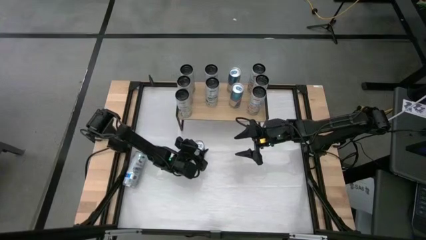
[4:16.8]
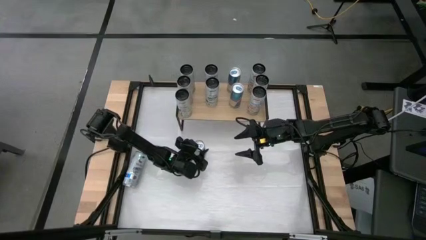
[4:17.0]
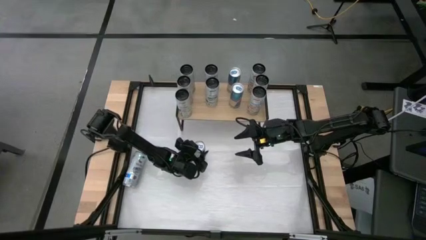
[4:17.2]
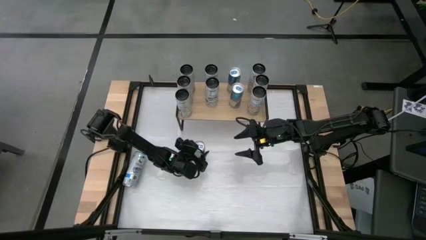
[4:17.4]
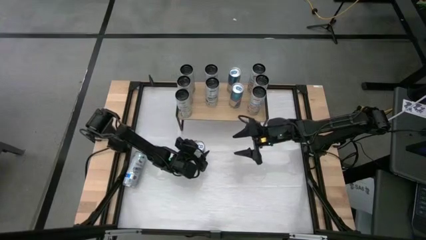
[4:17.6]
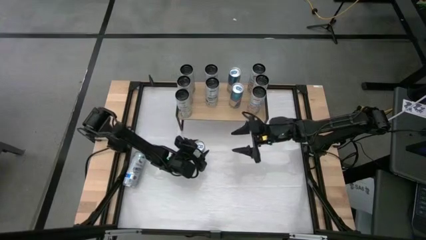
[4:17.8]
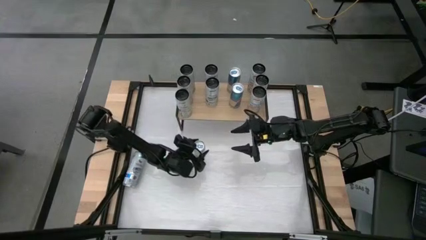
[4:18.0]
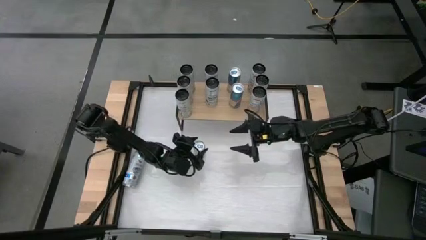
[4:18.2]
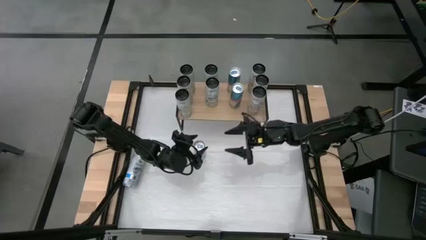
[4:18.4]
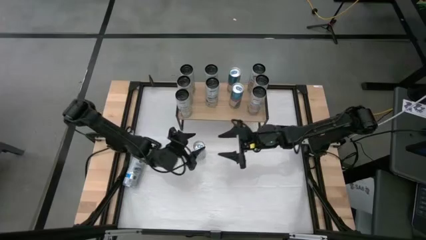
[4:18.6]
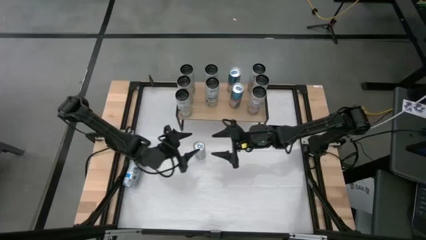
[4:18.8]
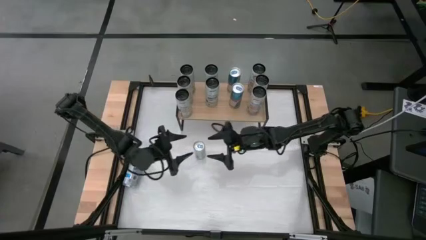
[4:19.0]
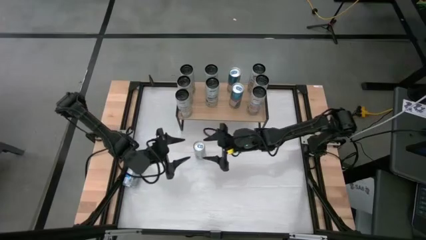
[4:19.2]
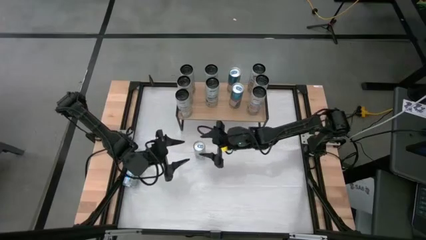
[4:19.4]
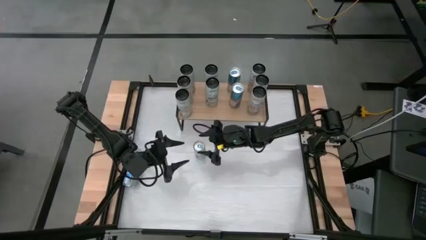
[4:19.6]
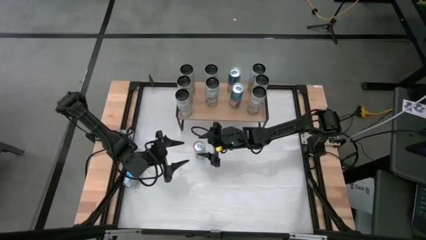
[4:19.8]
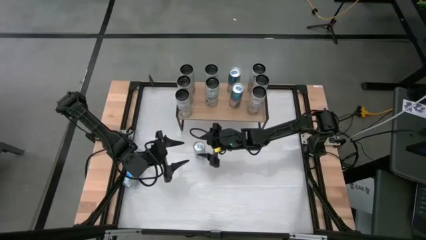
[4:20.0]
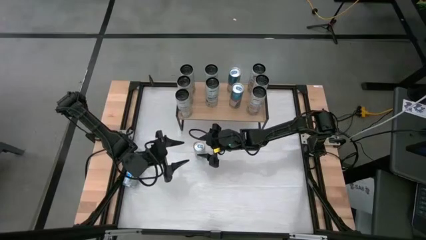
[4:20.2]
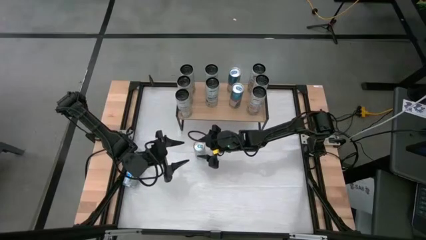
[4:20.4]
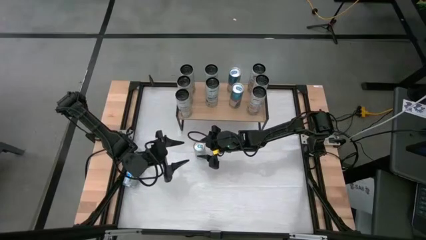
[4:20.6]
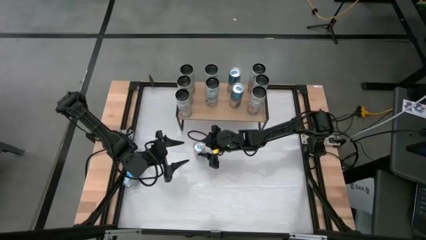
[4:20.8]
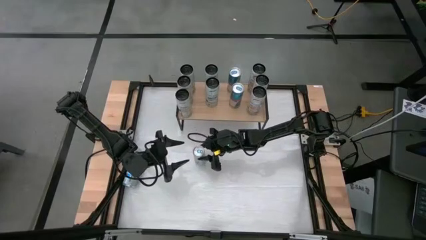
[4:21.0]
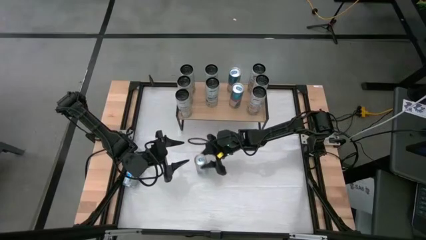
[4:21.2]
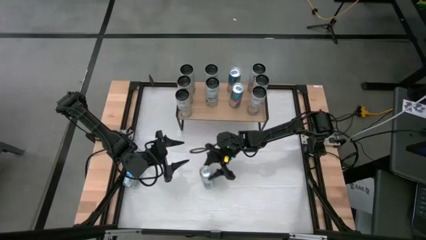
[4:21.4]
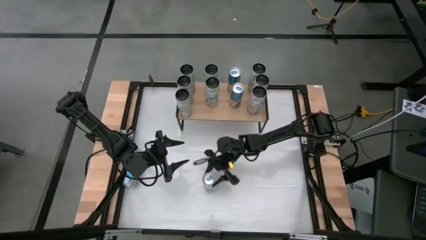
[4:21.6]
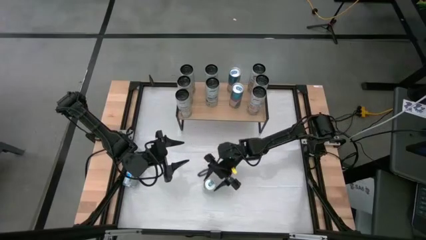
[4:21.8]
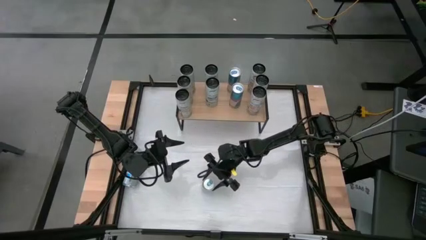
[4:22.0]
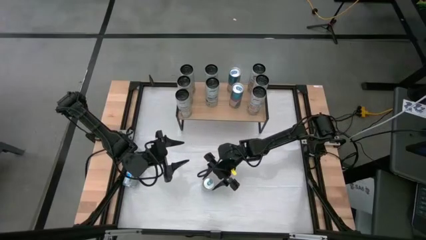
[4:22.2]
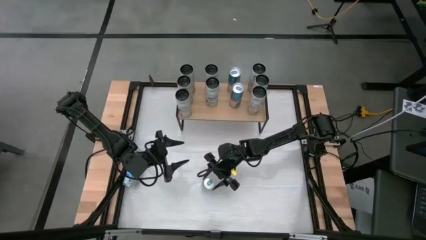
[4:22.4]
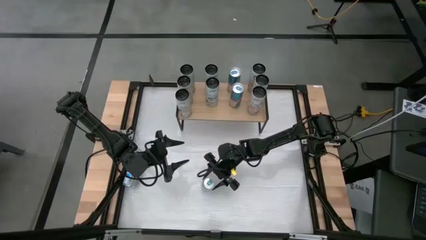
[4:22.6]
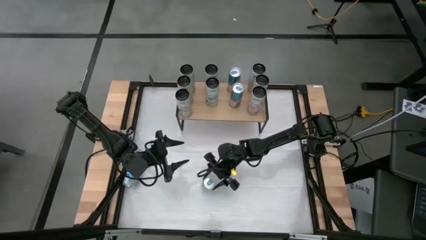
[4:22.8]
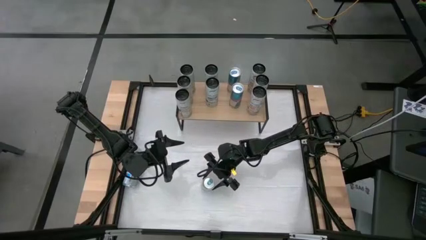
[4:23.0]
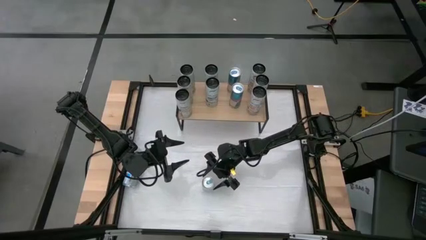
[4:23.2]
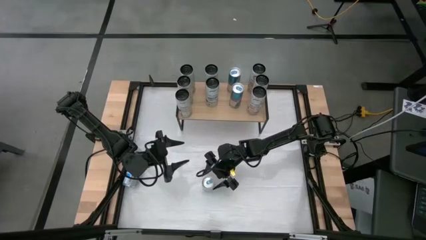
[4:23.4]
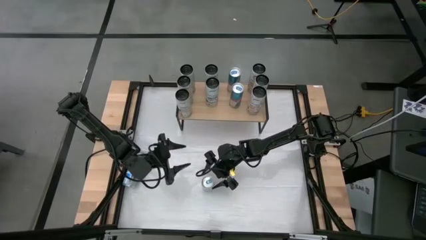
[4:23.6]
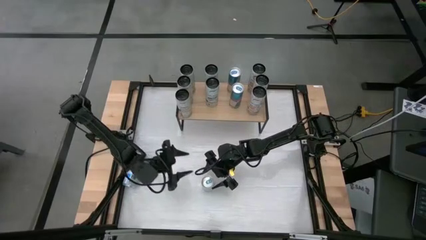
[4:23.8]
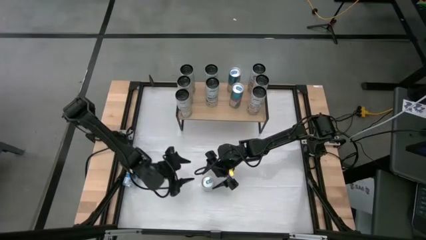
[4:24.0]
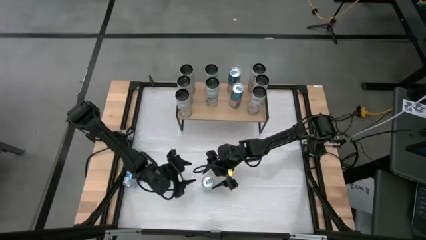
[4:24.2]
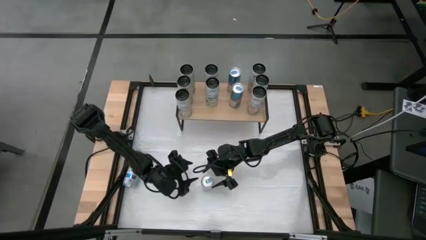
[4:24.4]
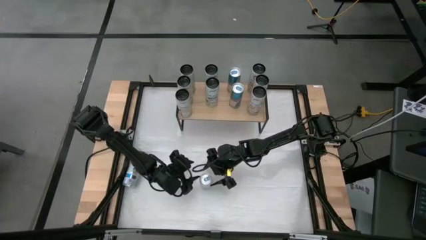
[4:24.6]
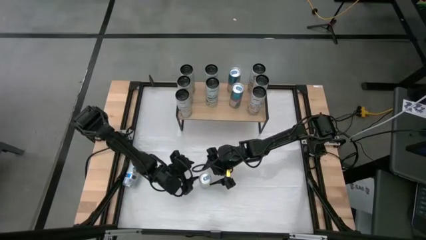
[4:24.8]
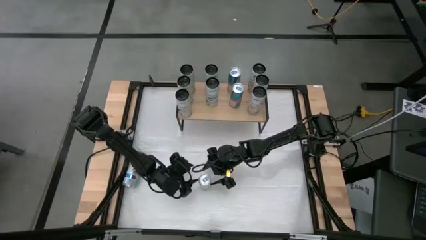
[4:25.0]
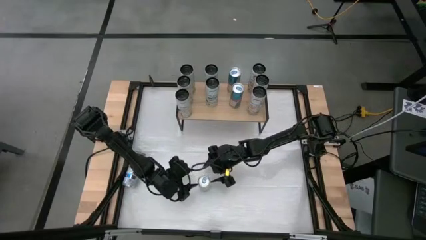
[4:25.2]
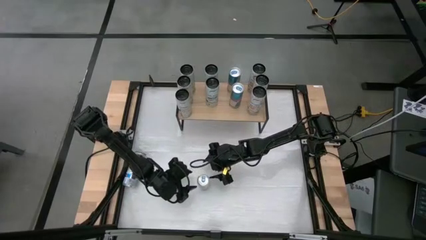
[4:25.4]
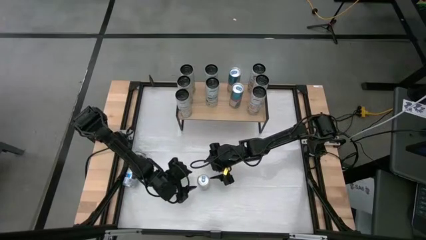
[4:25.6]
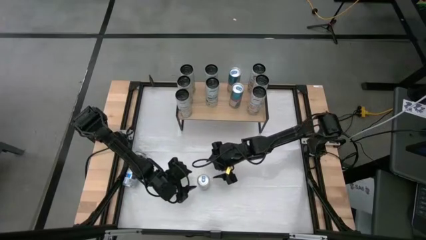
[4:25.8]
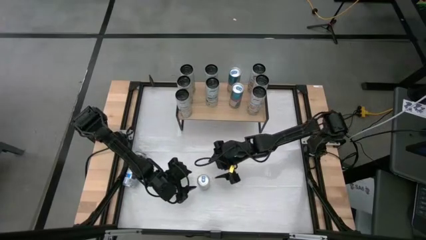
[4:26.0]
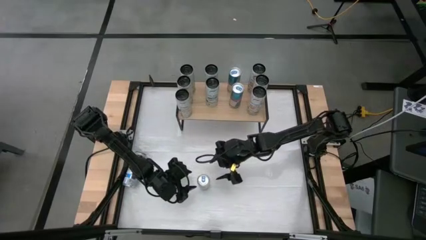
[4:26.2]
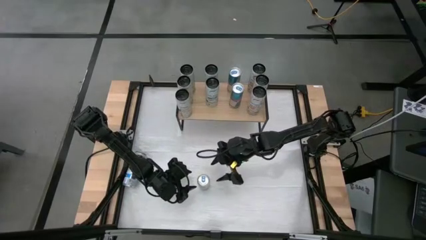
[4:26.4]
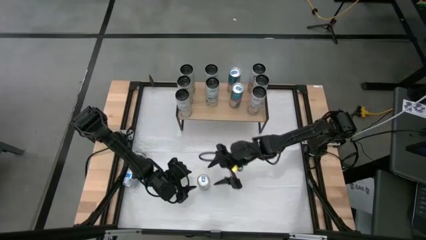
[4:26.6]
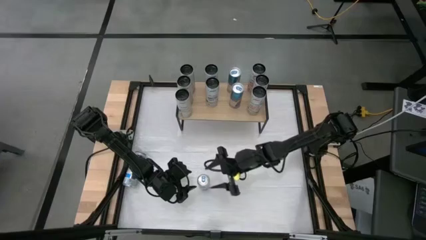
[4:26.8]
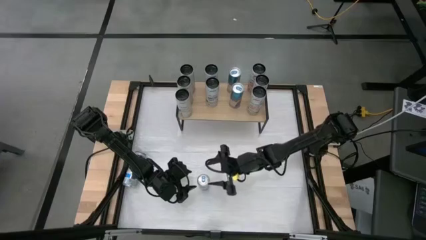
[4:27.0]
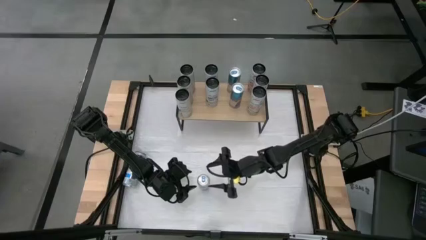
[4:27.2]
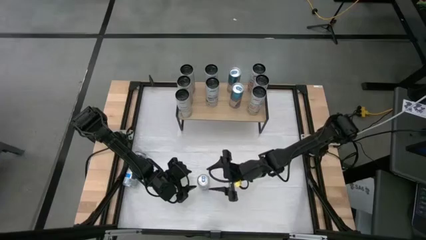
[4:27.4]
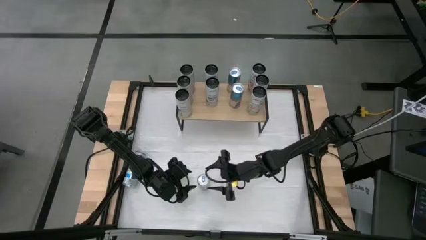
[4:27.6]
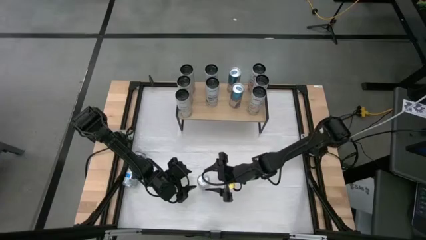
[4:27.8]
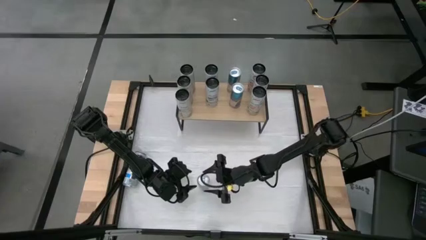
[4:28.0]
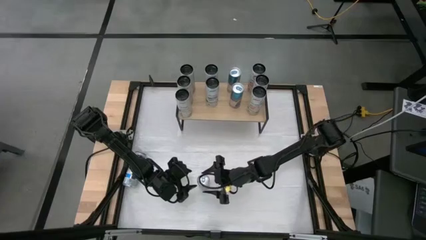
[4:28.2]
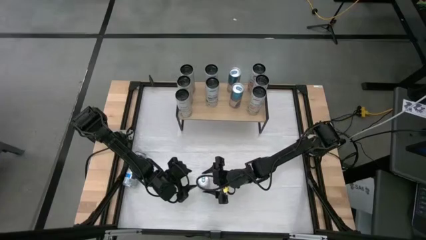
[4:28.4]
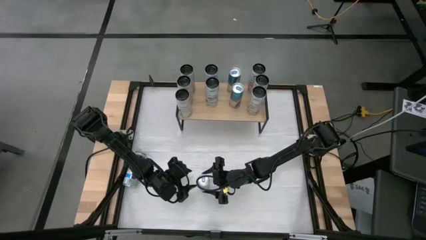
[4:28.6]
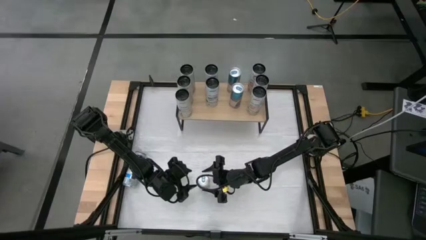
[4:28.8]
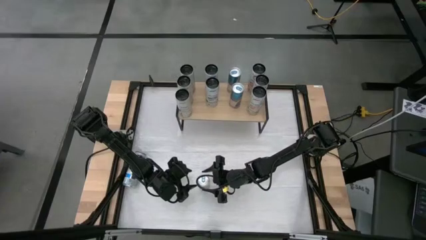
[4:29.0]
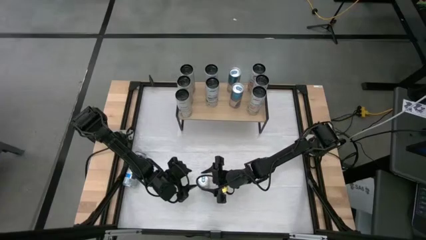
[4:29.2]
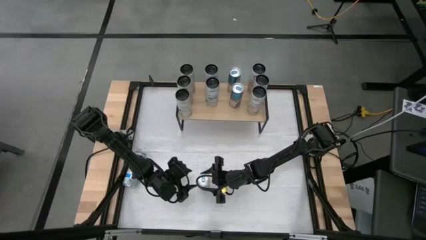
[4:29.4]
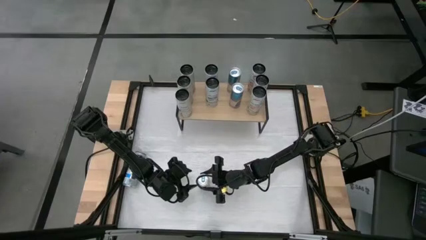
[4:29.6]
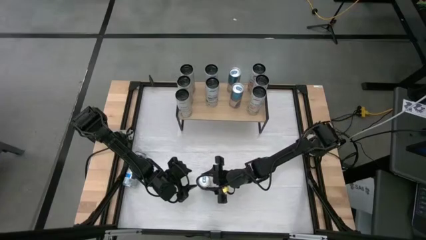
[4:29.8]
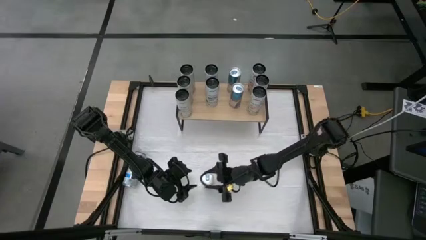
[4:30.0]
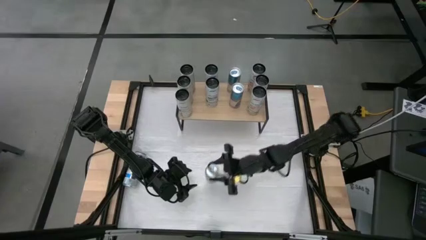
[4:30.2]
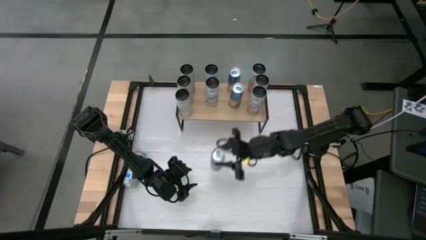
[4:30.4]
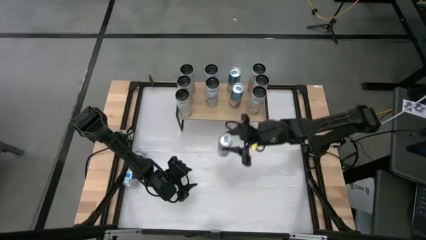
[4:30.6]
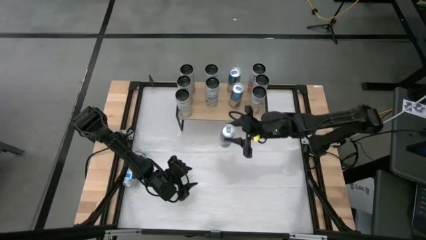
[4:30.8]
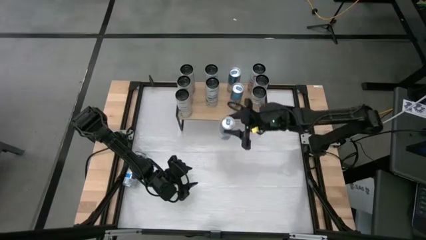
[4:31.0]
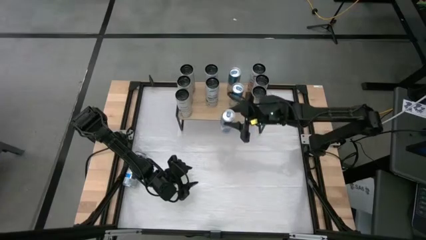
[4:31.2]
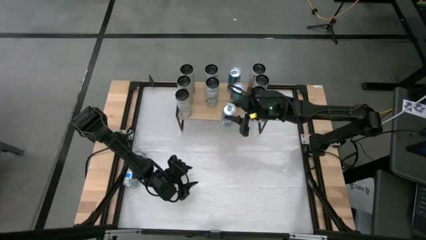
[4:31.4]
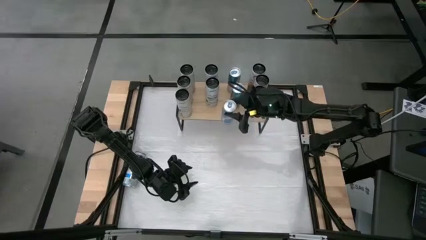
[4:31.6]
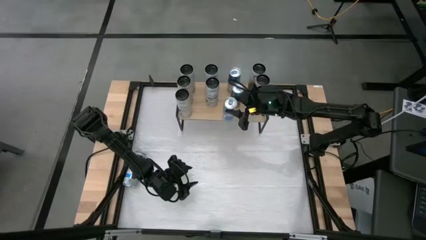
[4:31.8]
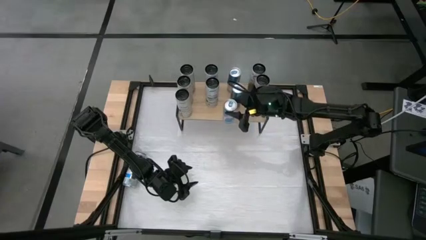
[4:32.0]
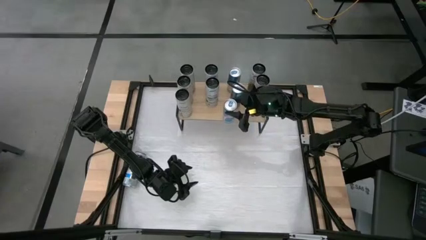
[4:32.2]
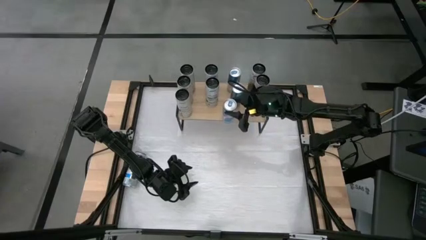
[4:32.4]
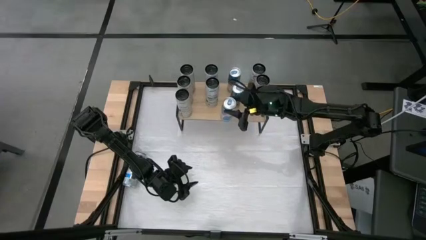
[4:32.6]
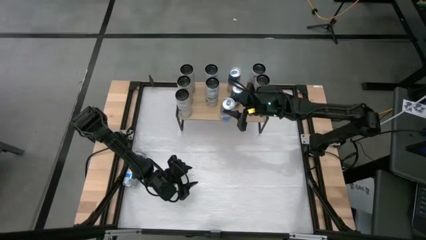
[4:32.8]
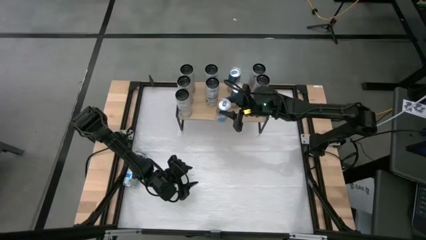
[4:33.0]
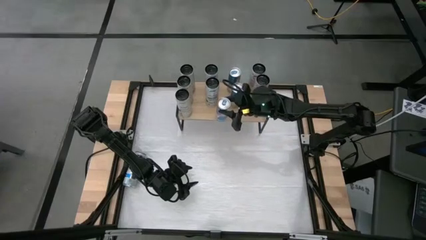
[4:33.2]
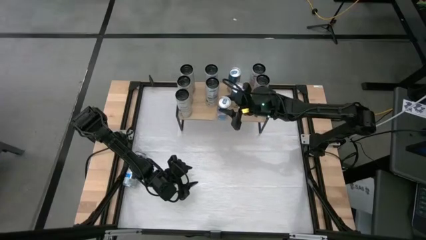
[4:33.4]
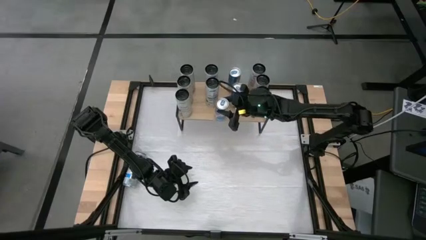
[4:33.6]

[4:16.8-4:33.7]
Task: Sort soda cans
Put the blue soda can on the shelf and align with other blue soda cans
